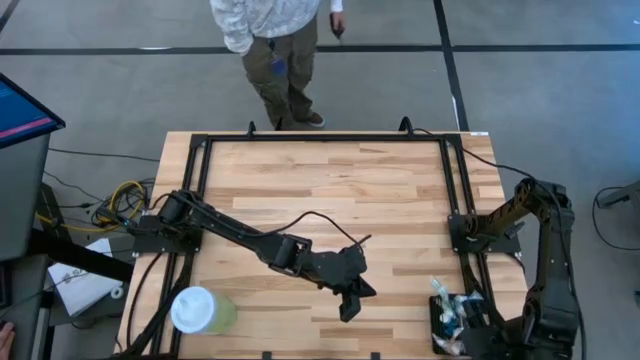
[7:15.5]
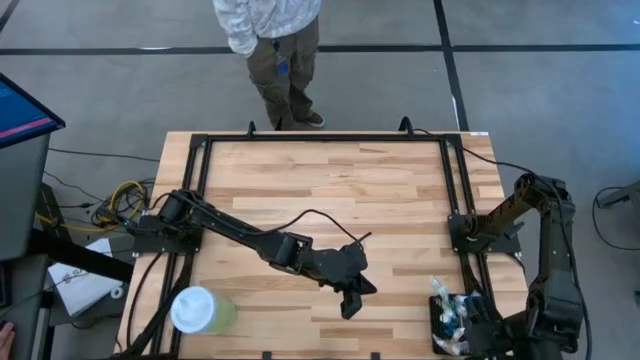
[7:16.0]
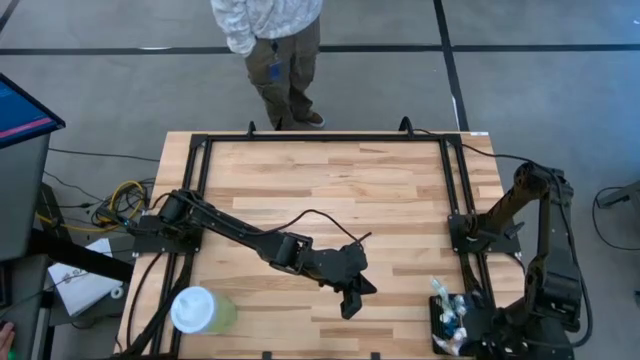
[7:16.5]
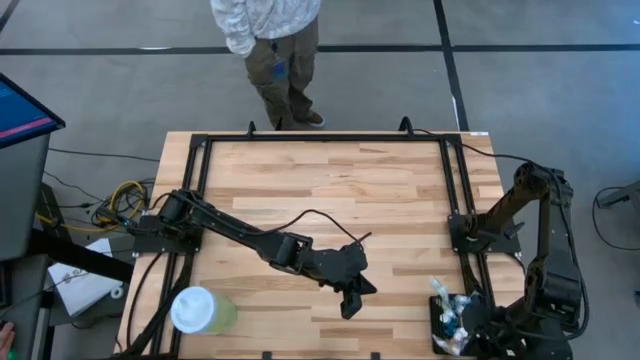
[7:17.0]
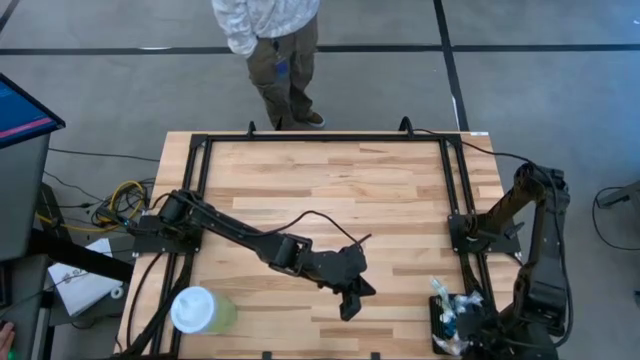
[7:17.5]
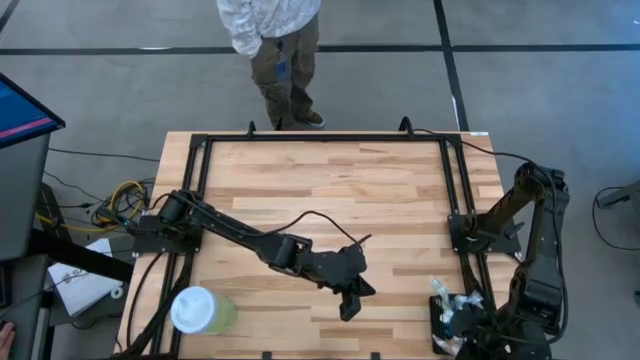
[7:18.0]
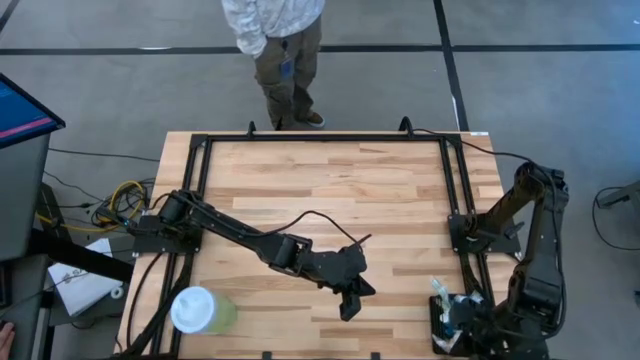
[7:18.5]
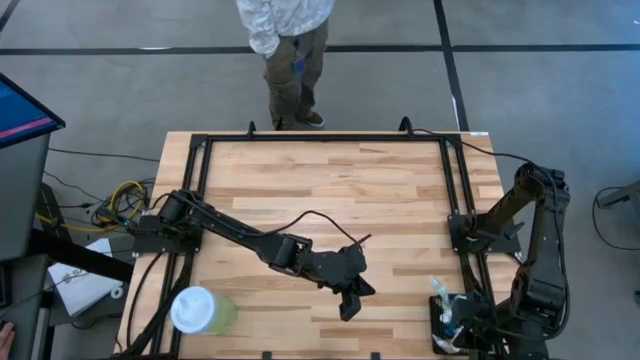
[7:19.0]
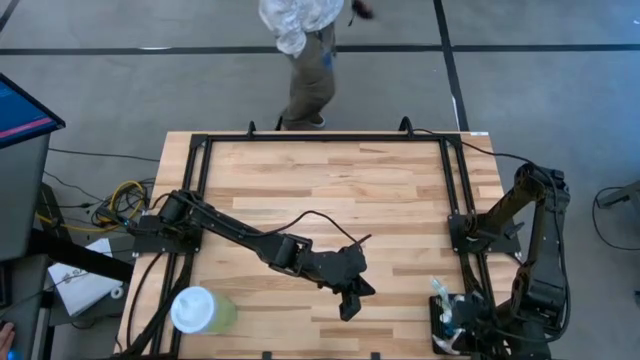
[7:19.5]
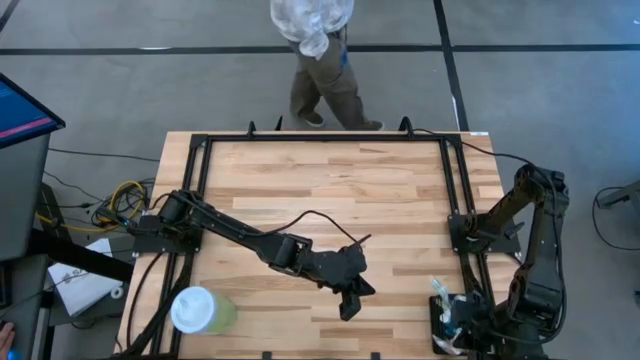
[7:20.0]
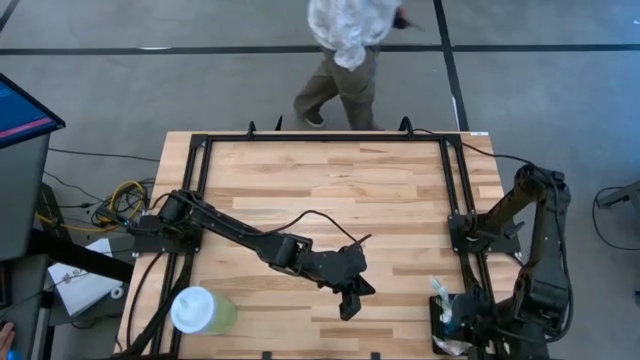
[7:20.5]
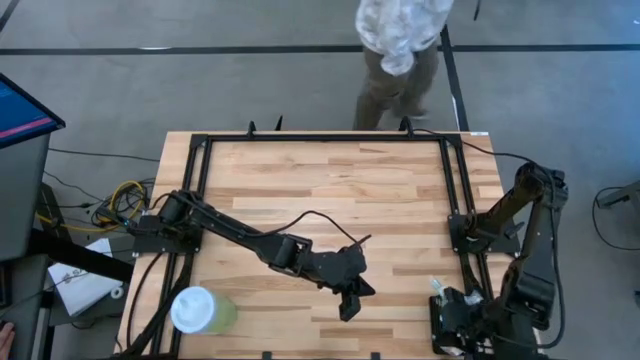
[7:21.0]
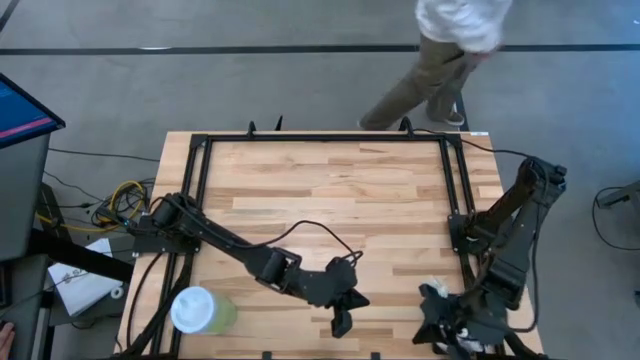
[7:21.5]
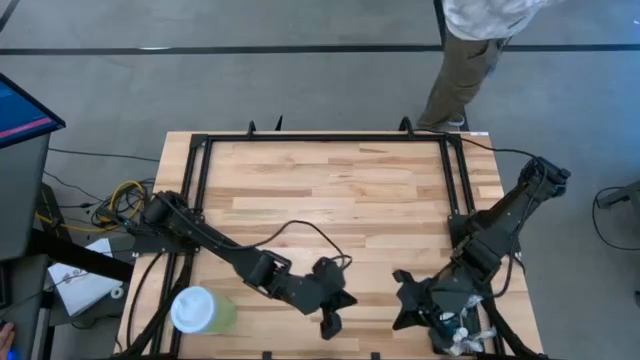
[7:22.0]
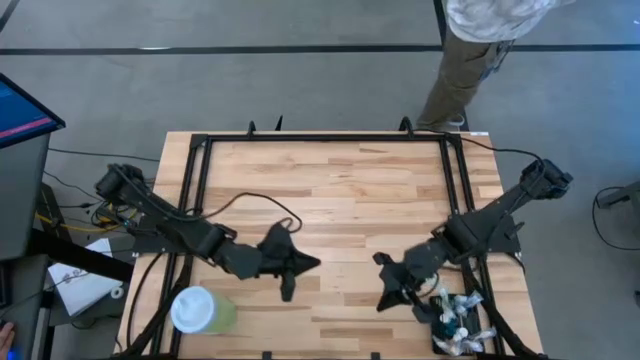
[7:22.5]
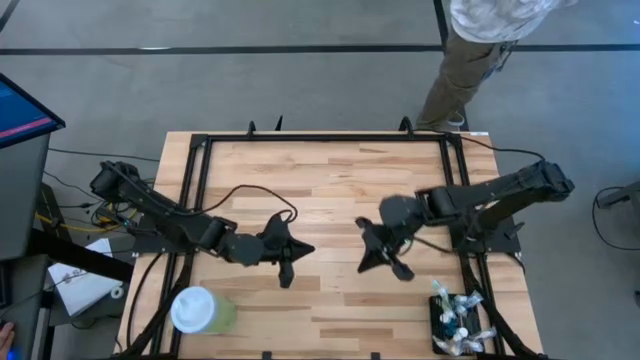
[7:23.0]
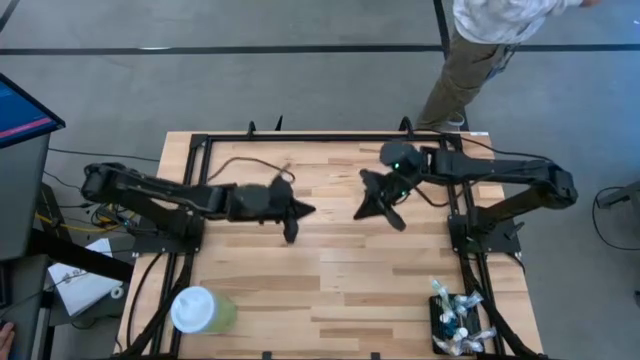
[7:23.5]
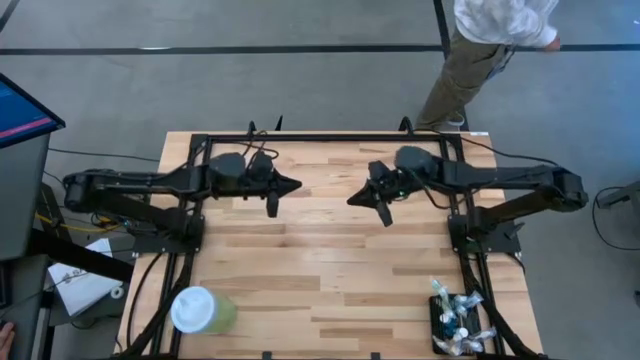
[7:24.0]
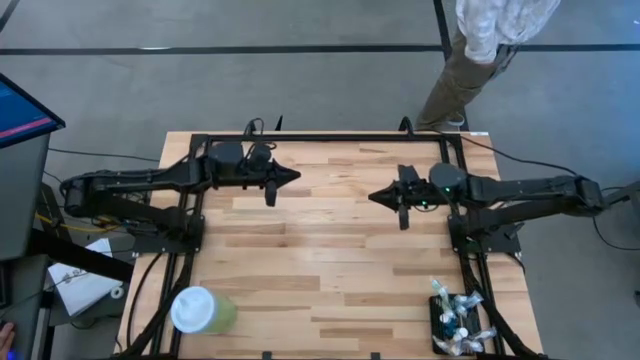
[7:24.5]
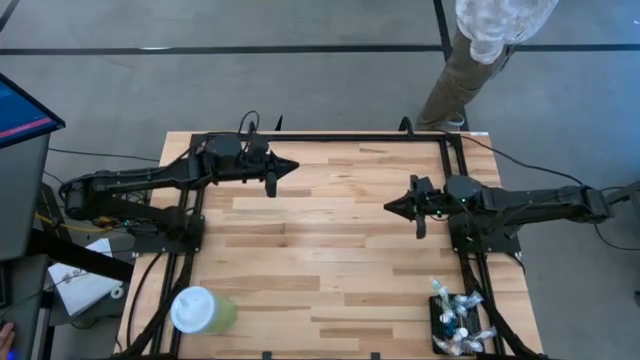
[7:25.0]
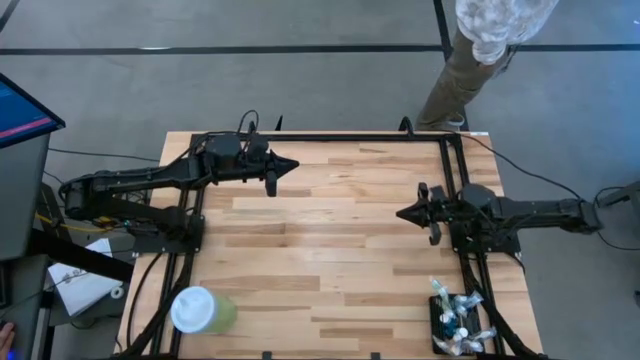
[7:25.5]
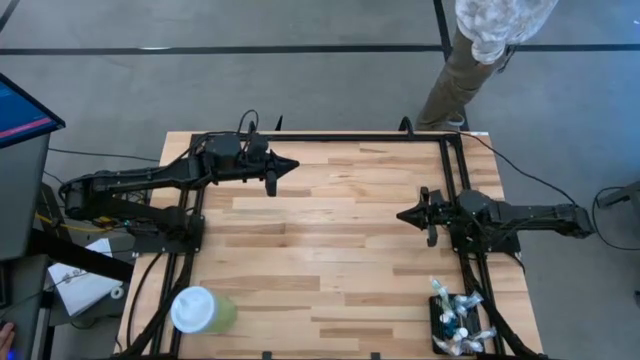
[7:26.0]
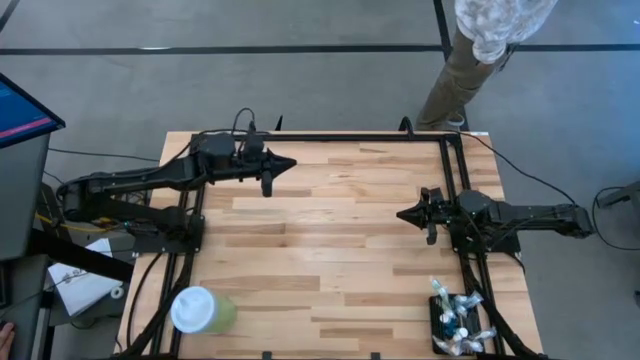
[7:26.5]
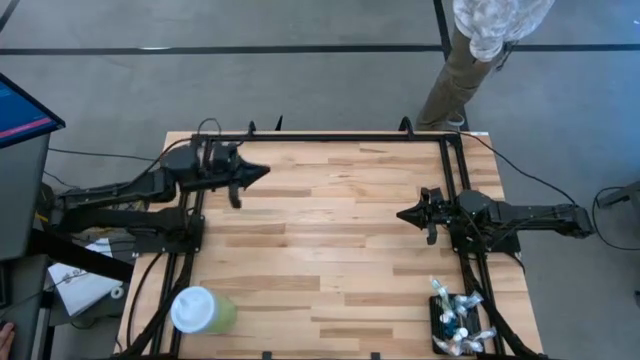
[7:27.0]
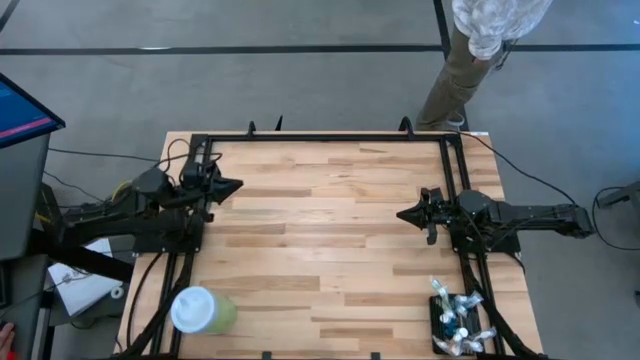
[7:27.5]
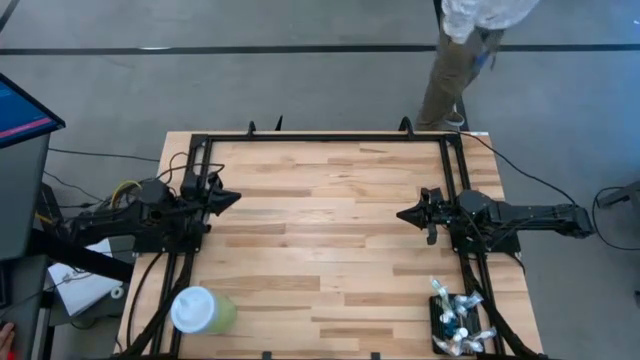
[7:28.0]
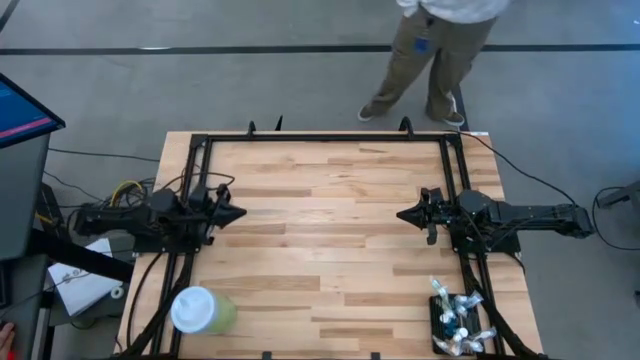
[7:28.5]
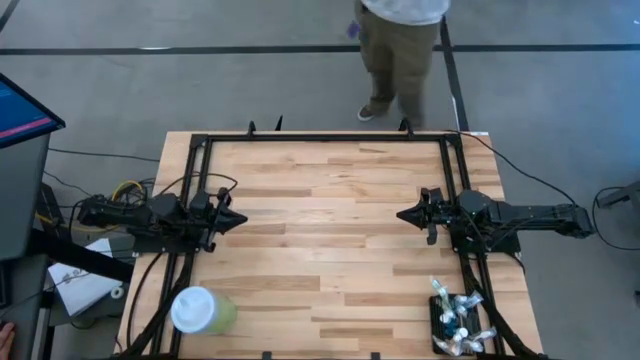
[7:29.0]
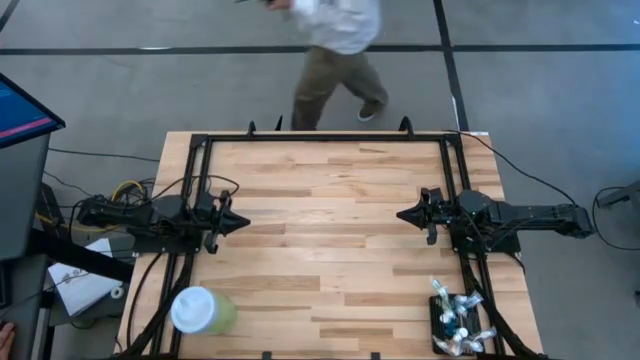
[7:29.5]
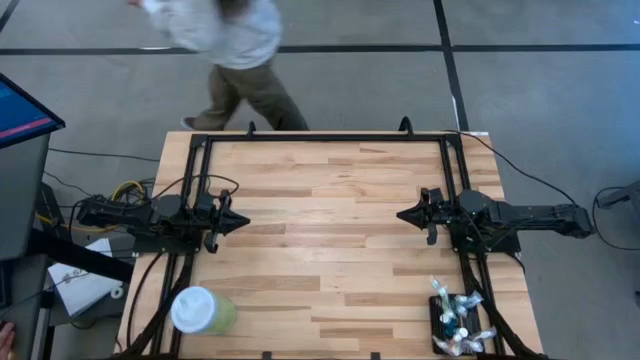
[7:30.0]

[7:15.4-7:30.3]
Task: Pick & Place toothbrushing station
Return to Home Position

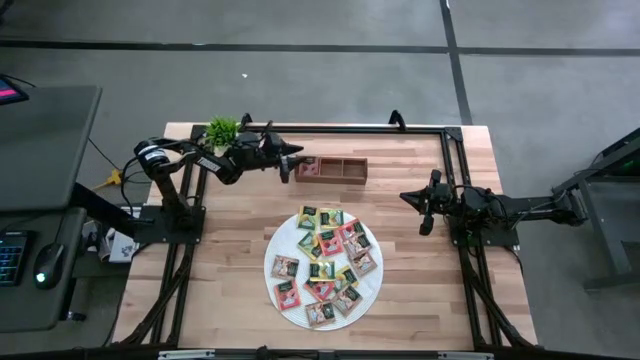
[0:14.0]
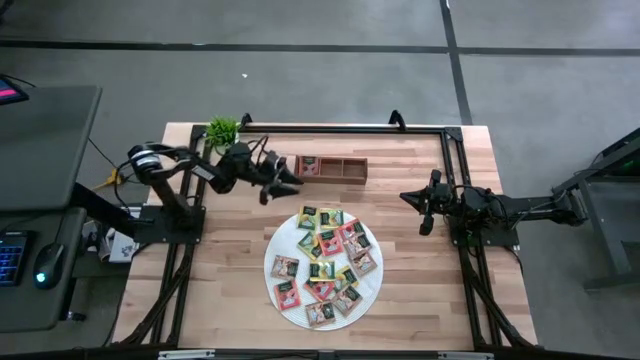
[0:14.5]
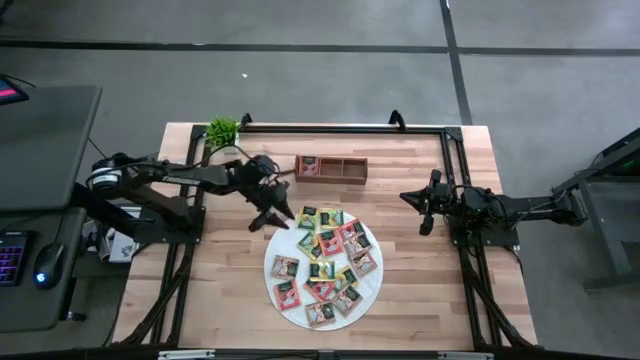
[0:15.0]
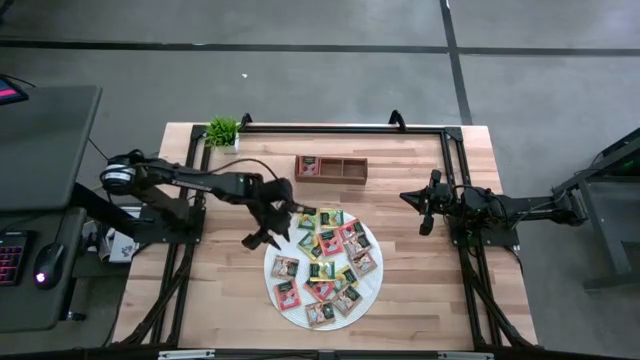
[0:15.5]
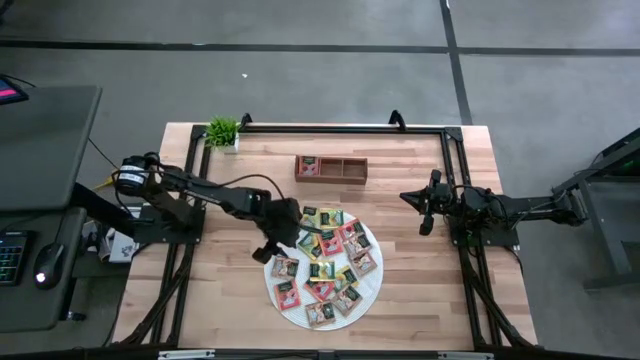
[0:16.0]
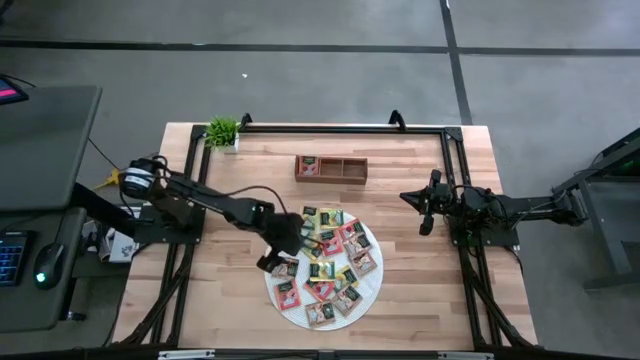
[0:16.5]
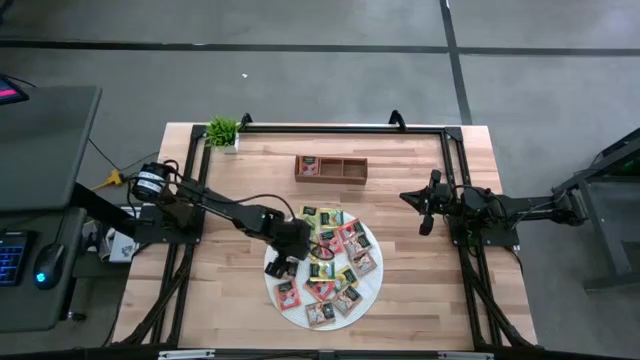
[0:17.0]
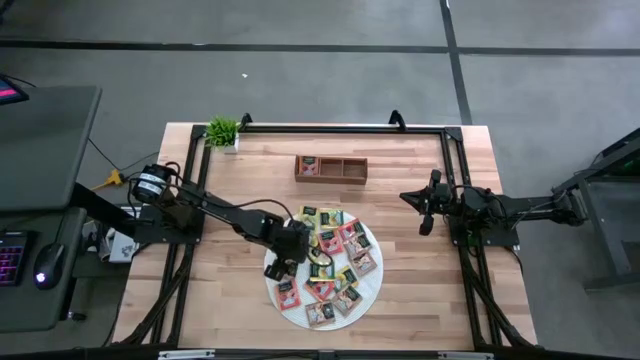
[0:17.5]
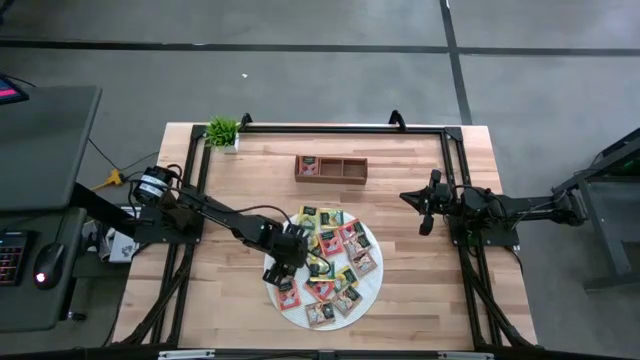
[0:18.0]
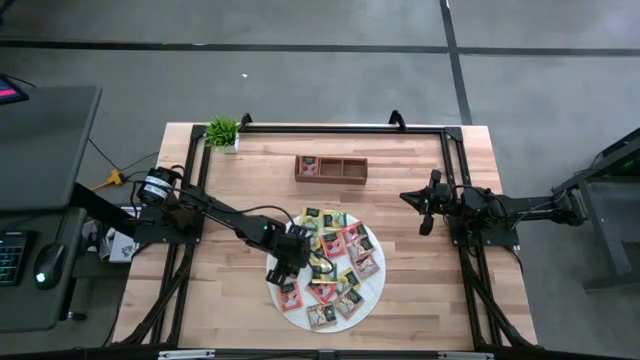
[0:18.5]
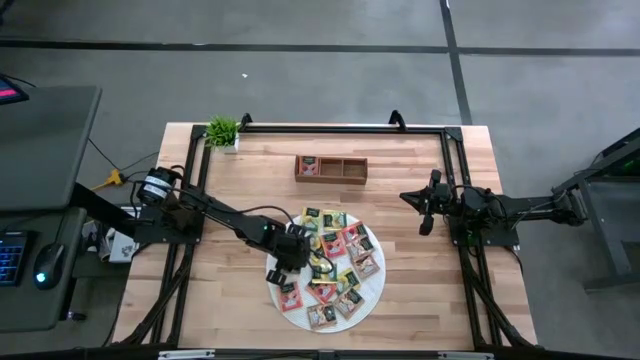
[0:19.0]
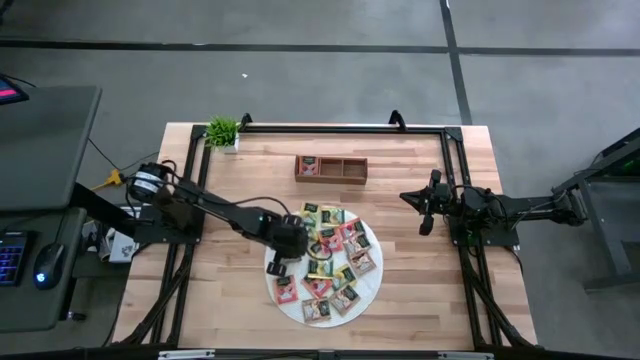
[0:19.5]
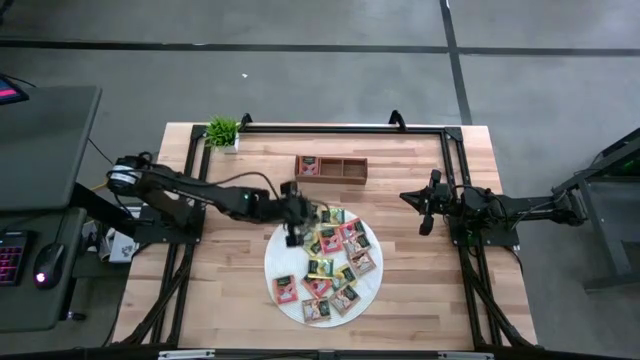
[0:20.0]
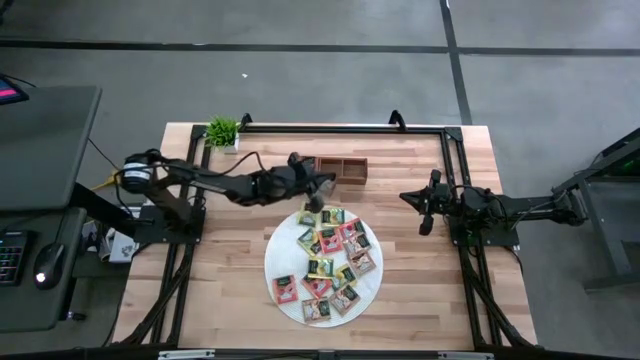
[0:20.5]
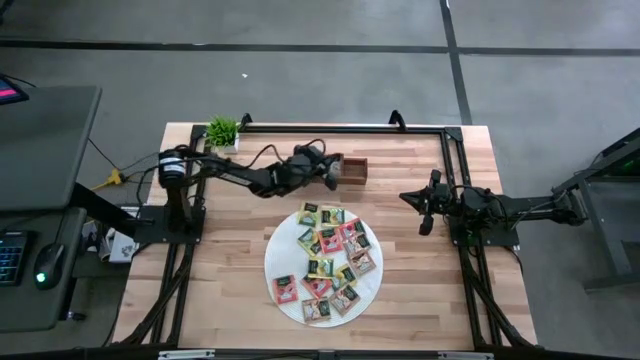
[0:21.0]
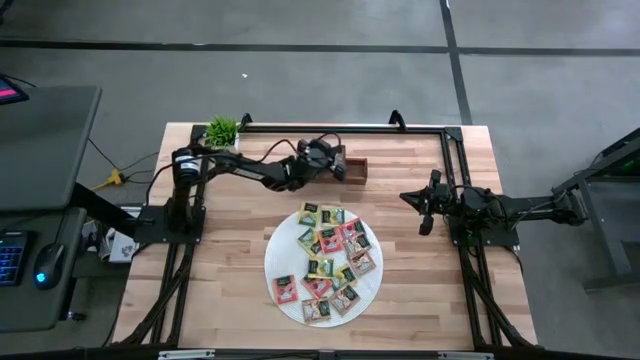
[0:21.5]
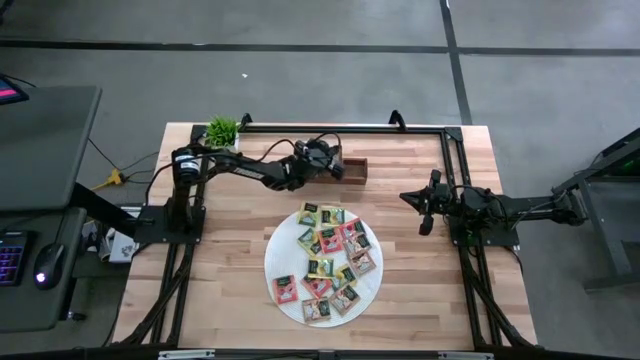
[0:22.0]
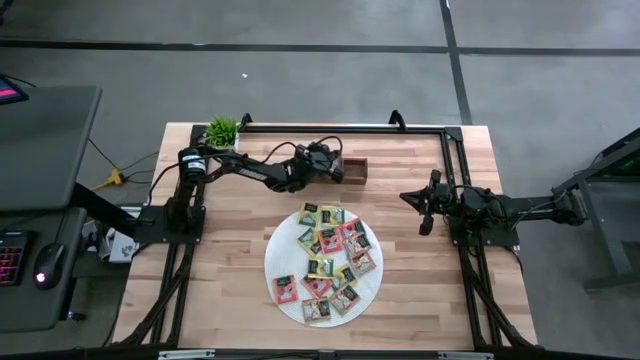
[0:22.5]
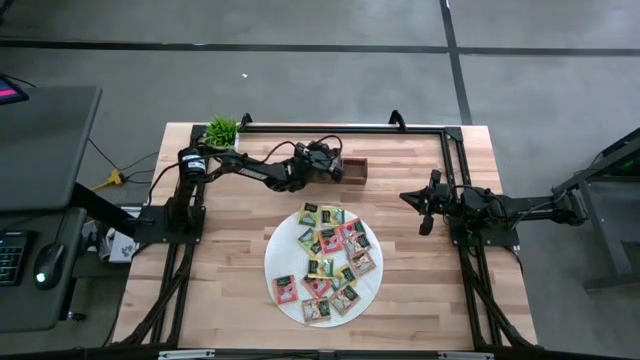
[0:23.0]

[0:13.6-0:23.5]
Task: Pick & Place Tea
Put the brown tea bag into the middle section of the wooden organizer
